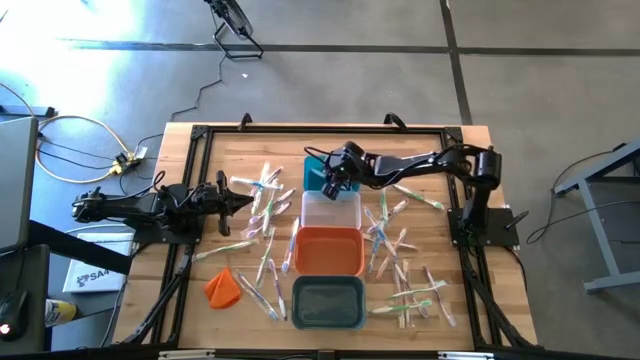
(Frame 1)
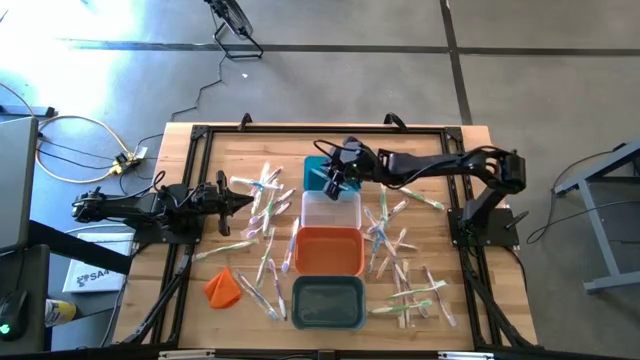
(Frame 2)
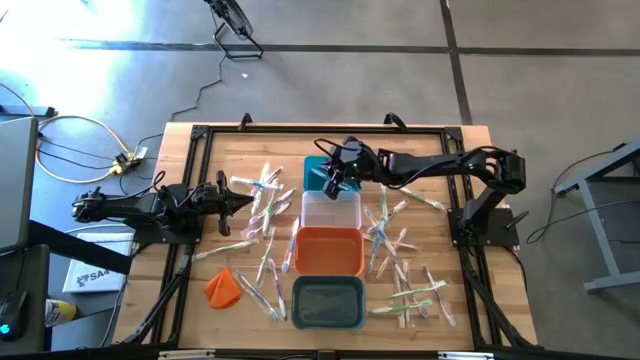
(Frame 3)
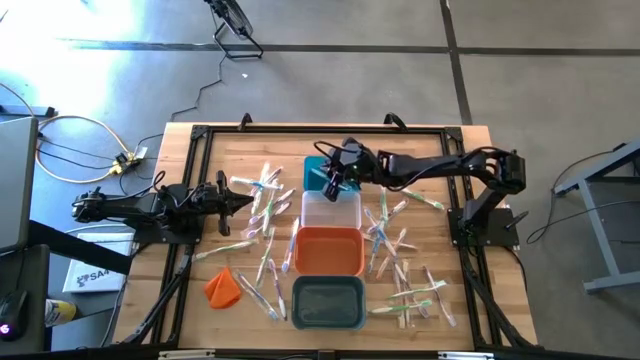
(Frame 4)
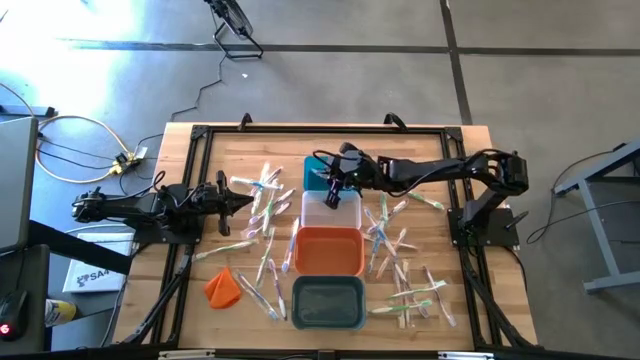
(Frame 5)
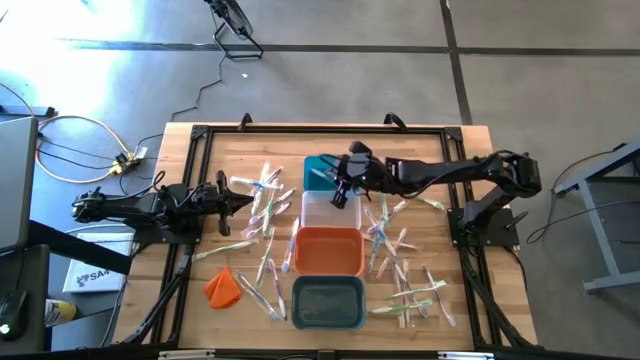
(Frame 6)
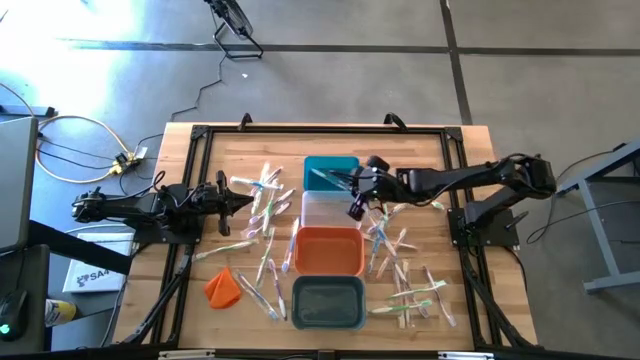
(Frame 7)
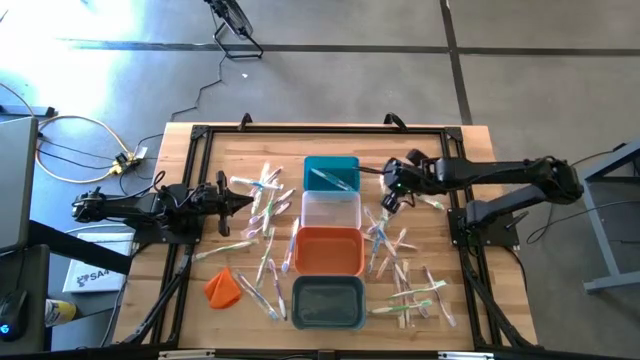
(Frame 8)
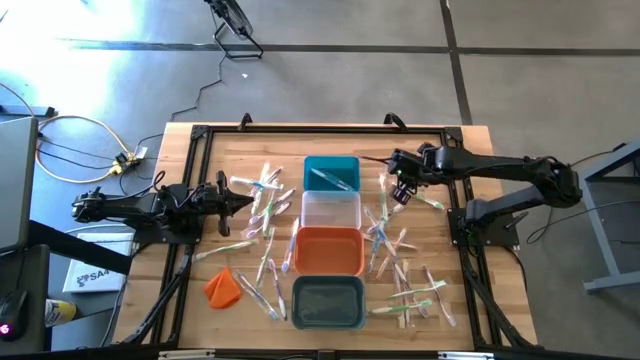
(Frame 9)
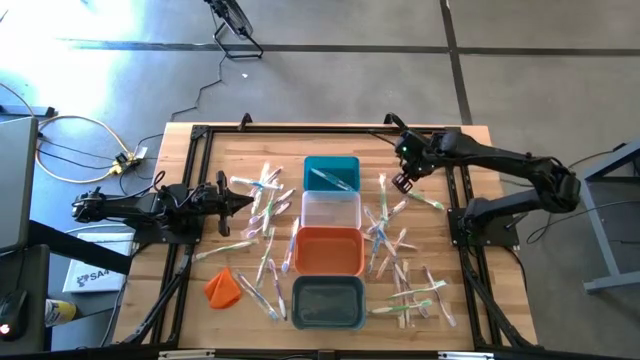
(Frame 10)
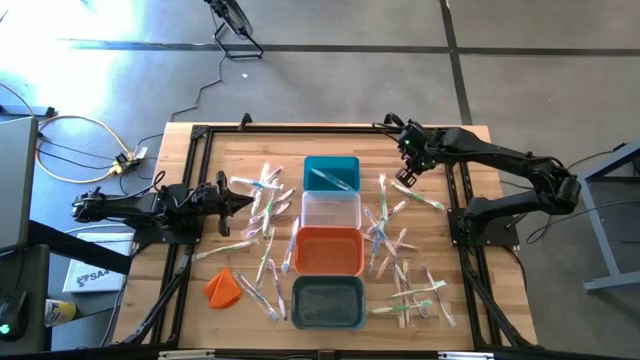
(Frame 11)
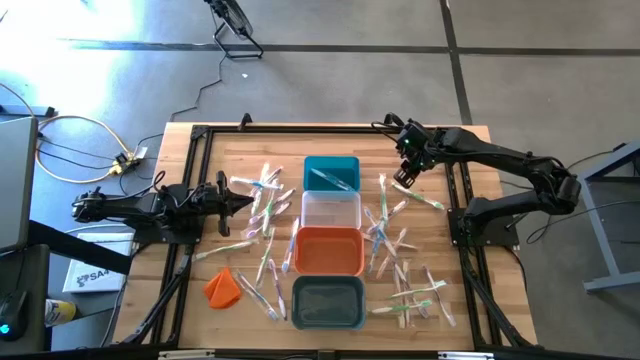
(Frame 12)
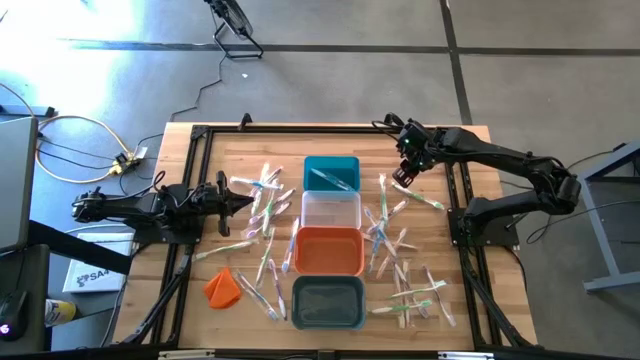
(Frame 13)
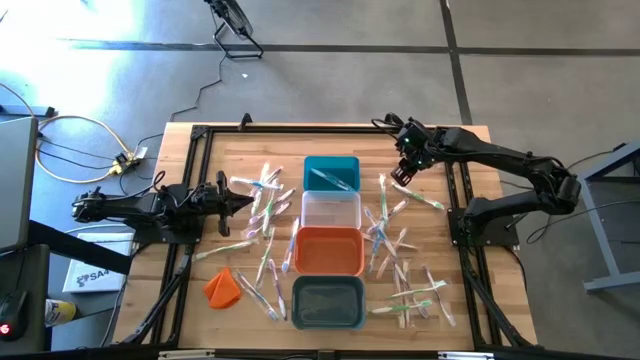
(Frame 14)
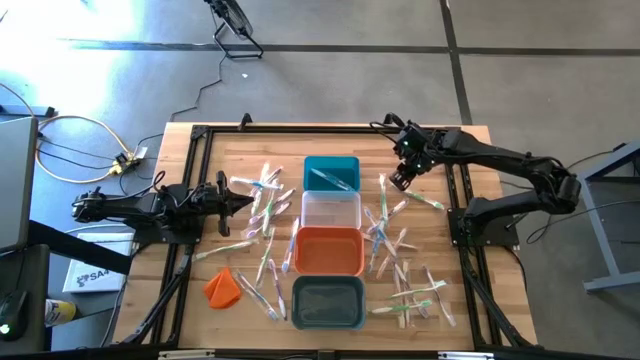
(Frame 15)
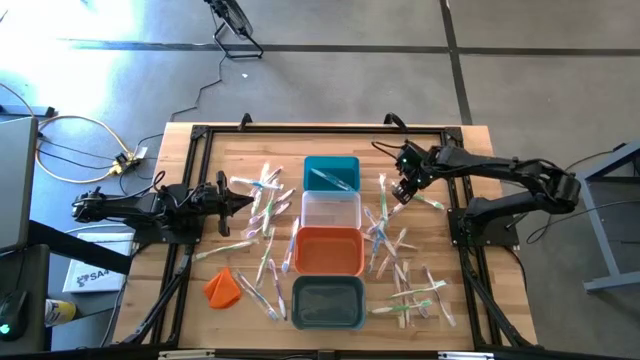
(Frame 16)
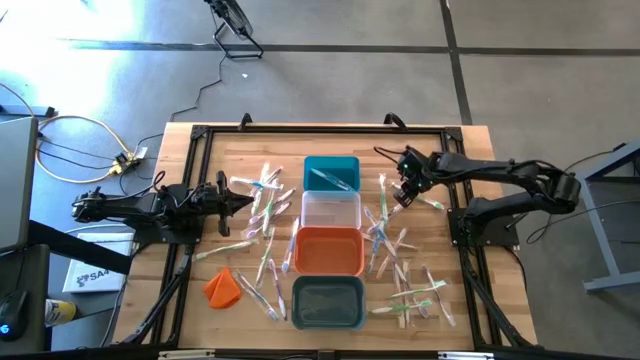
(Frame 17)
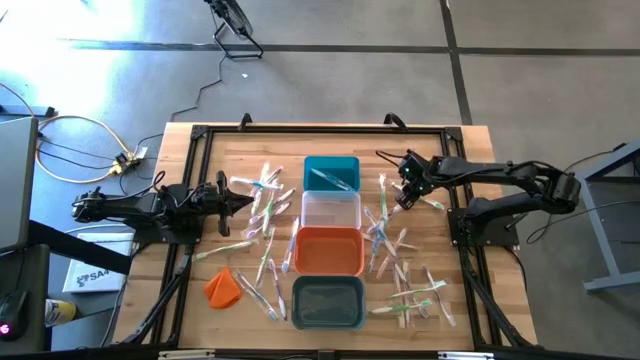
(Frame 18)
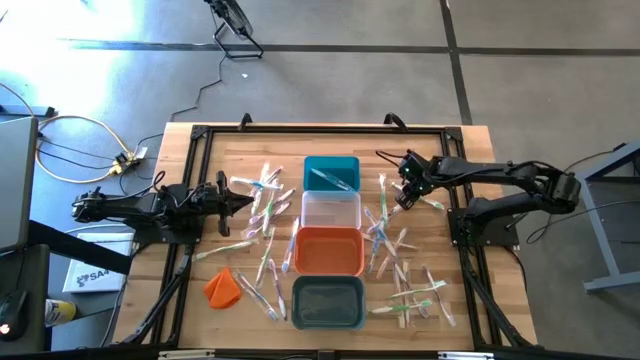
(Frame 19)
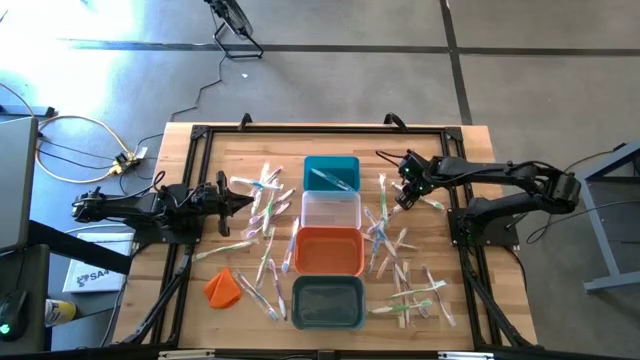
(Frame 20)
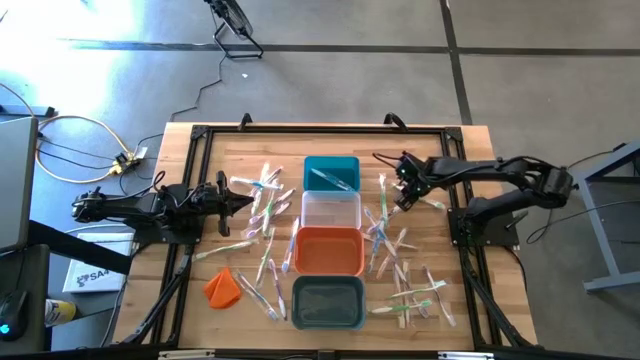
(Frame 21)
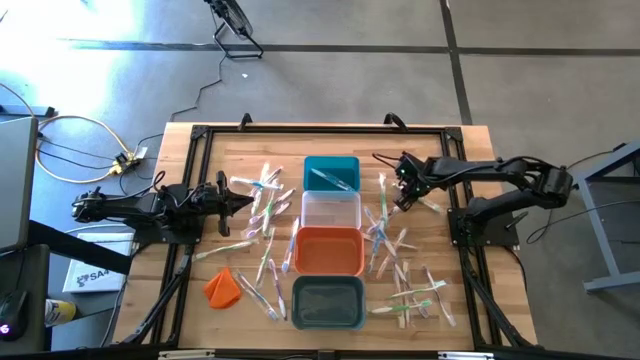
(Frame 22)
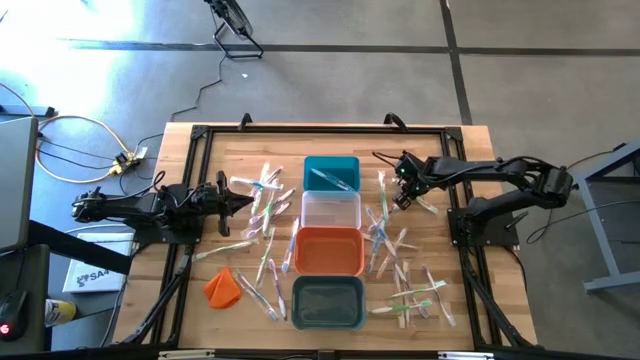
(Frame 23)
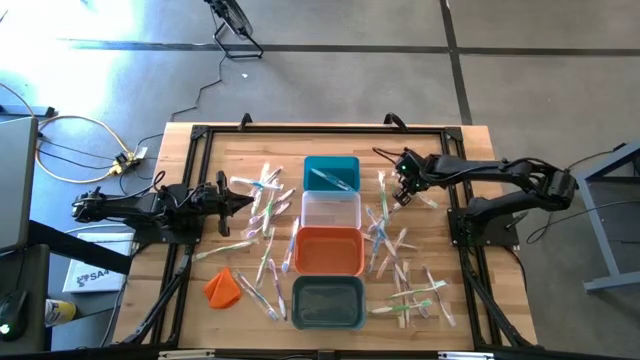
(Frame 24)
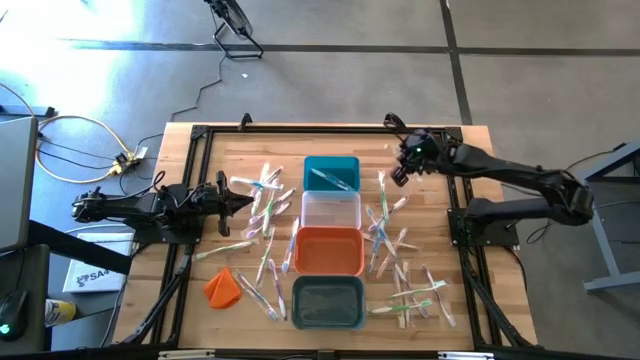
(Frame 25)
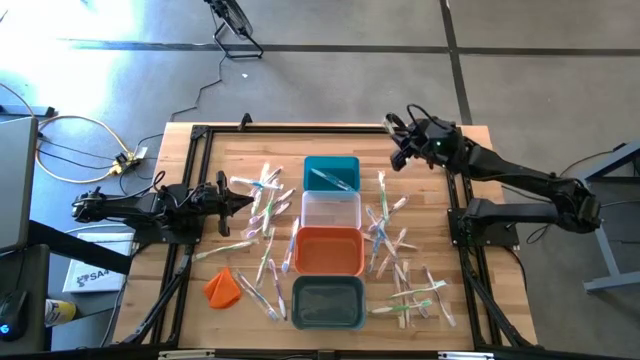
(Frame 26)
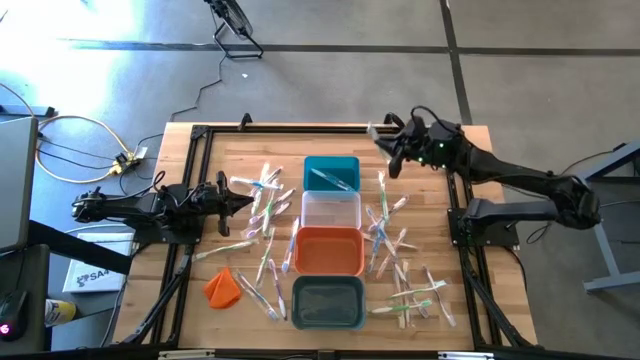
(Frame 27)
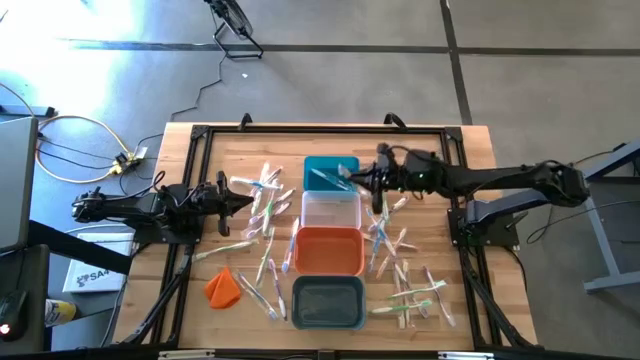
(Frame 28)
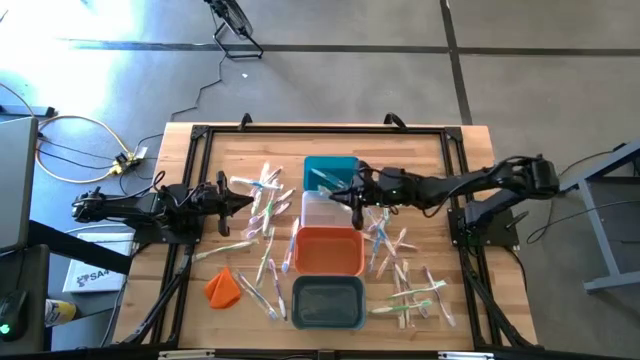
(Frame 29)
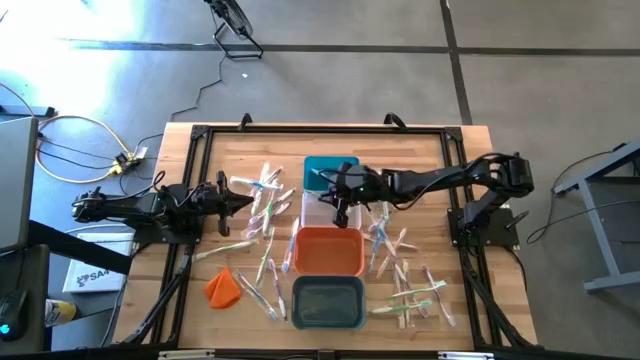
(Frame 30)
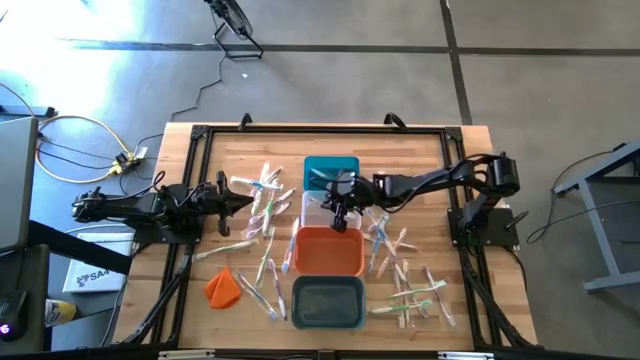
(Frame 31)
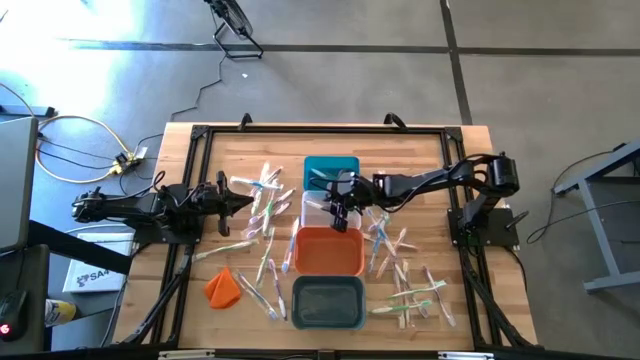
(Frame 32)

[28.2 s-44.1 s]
Task: Pick & Place Toothbrushes
Put the green toothbrush into the transparent bin

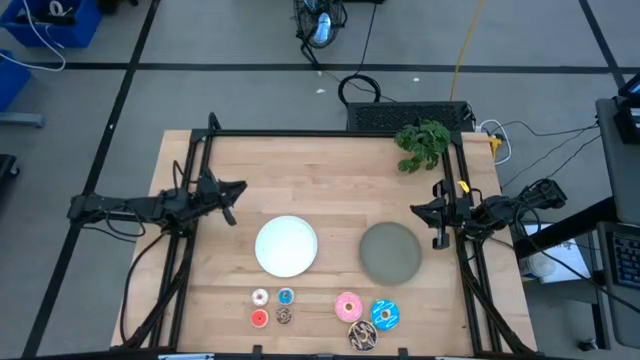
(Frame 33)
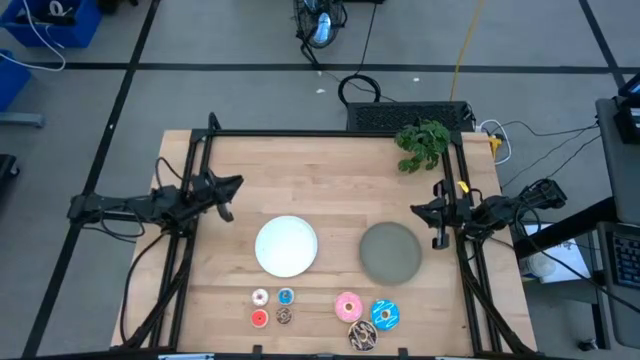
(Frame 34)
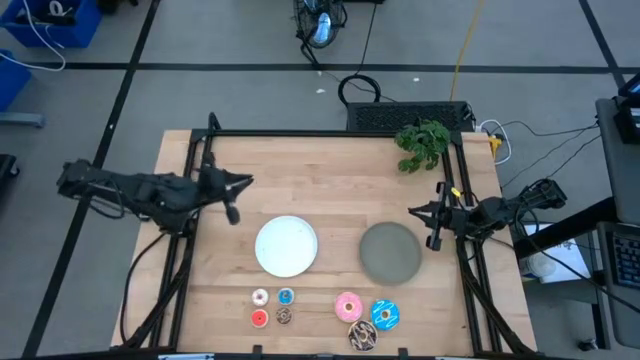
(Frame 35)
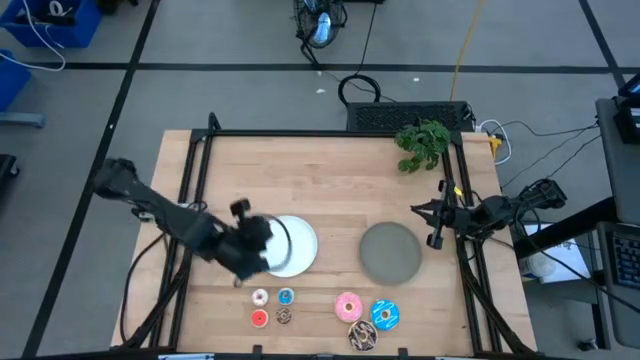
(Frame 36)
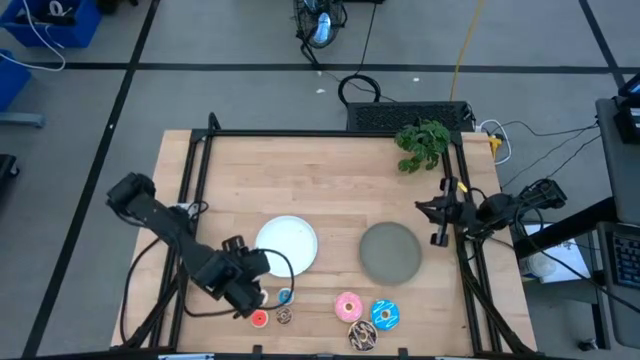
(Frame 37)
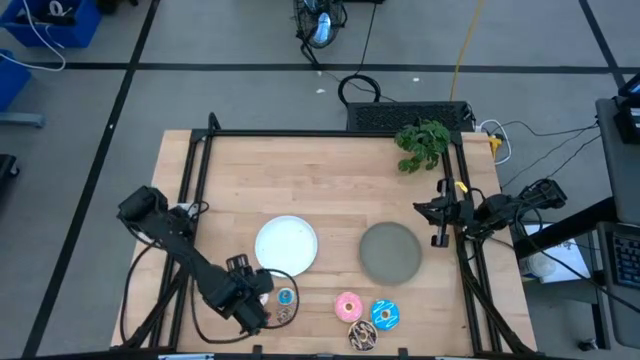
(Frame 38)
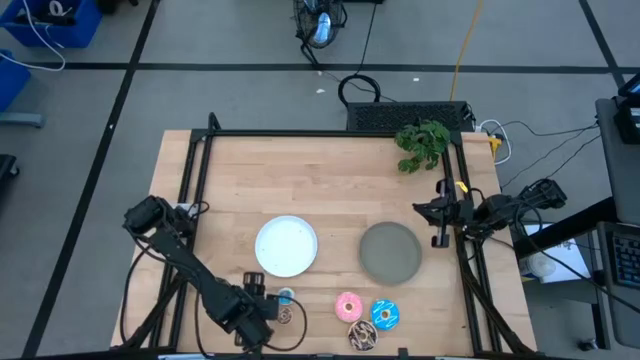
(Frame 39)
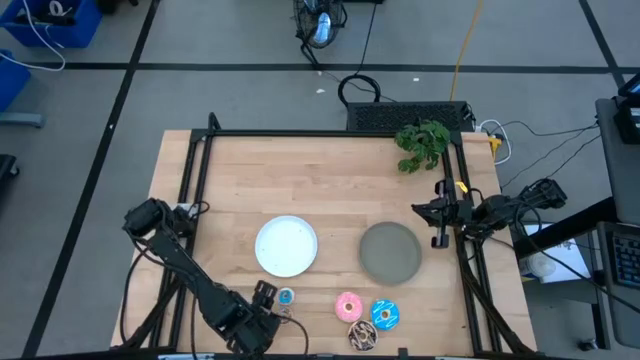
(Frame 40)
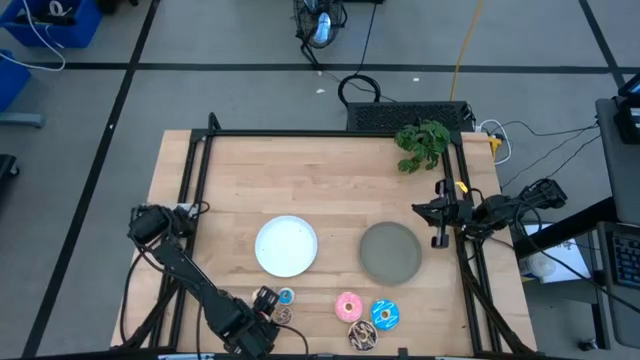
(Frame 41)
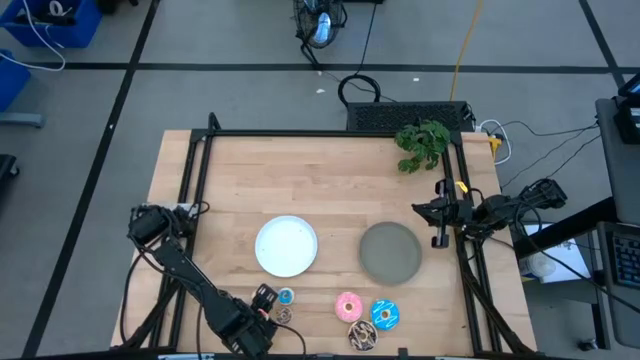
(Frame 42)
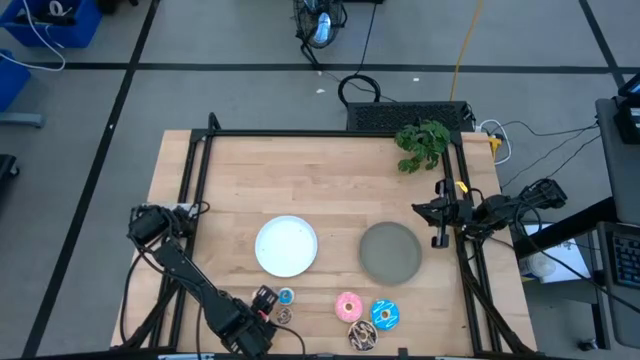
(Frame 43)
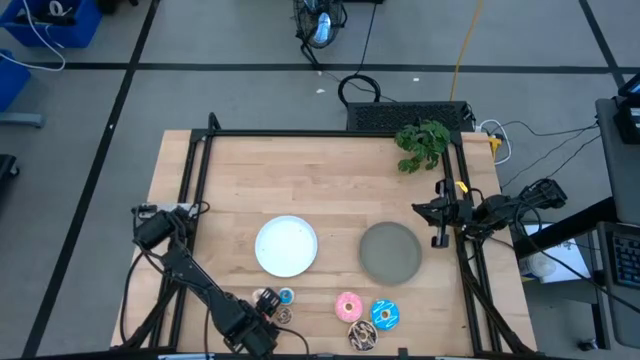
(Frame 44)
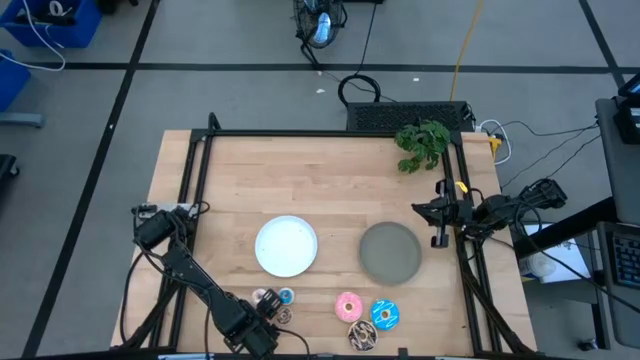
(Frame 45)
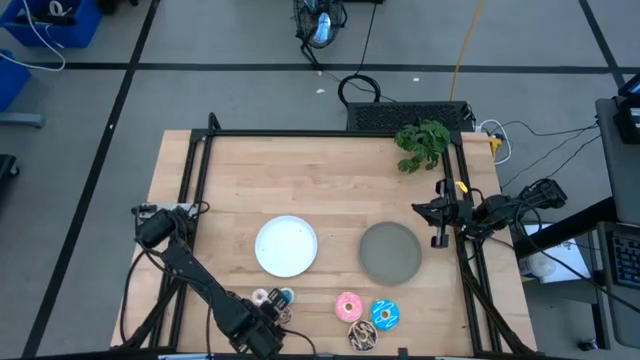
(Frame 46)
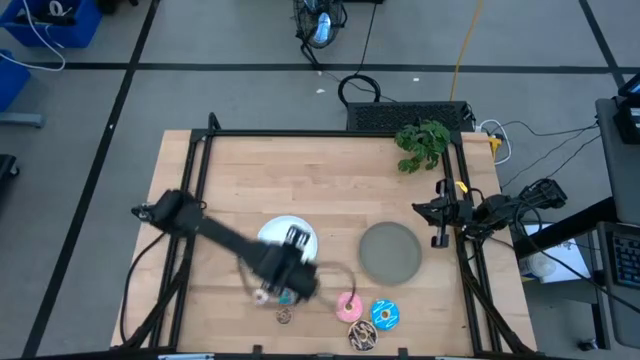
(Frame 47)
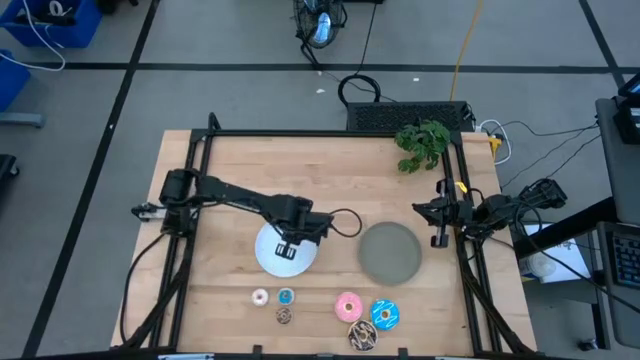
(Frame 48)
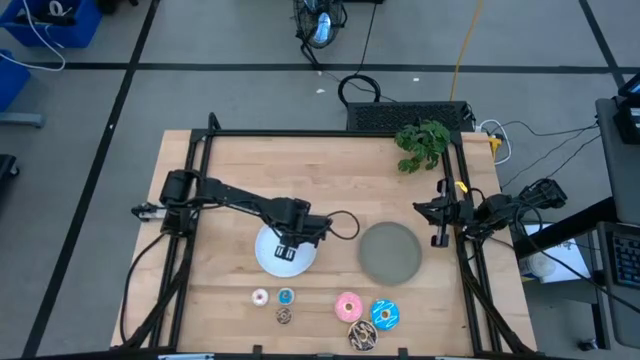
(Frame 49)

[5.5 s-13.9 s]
Task: Pick & Place donuts
Put the small orange doughnut on the white plate
